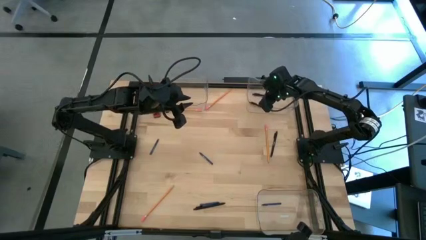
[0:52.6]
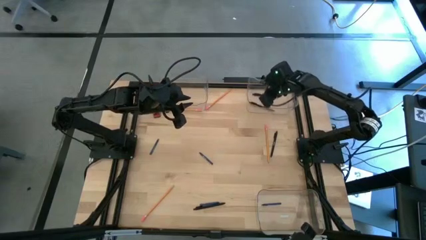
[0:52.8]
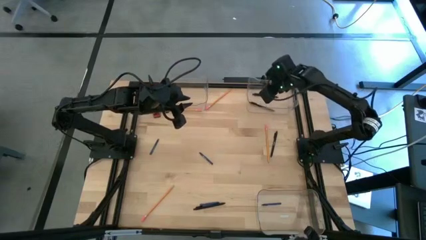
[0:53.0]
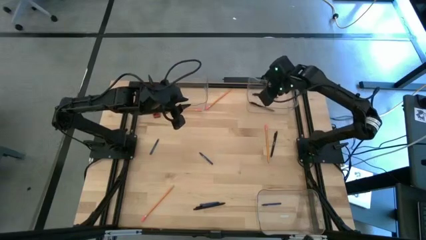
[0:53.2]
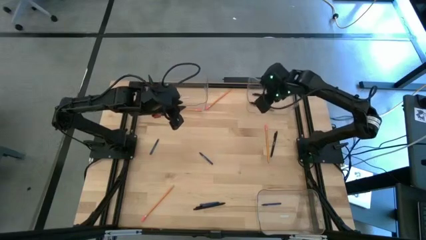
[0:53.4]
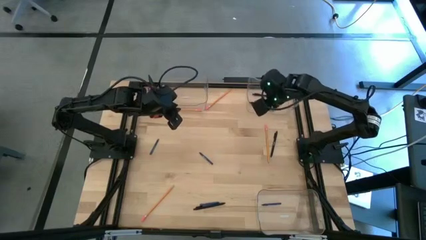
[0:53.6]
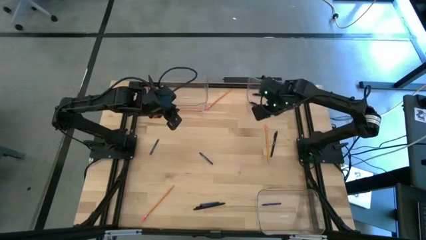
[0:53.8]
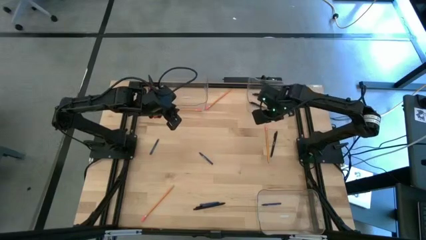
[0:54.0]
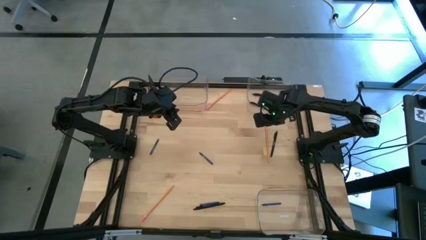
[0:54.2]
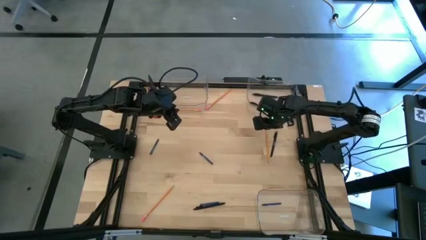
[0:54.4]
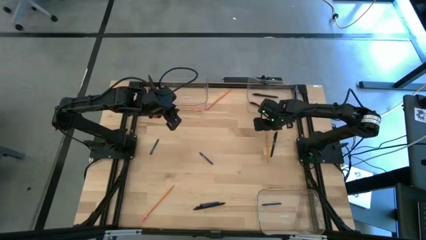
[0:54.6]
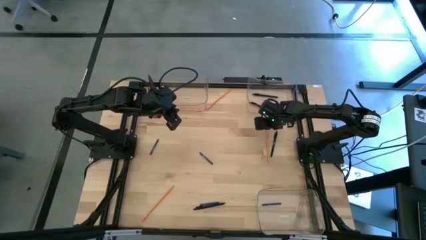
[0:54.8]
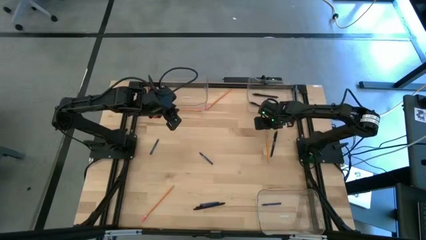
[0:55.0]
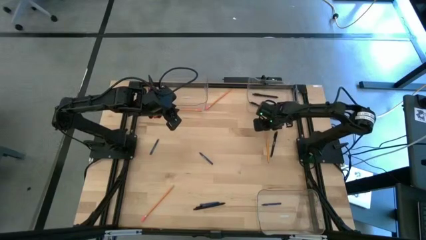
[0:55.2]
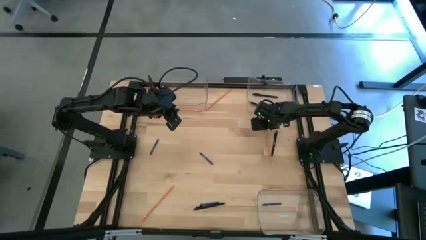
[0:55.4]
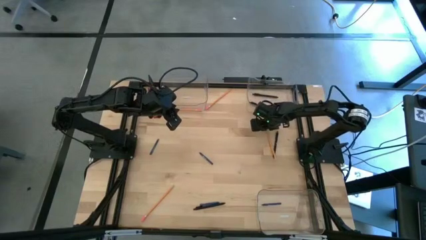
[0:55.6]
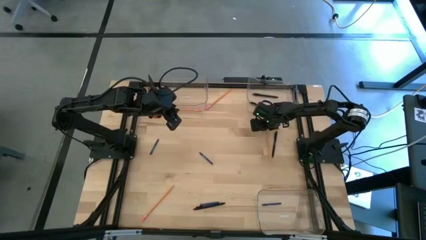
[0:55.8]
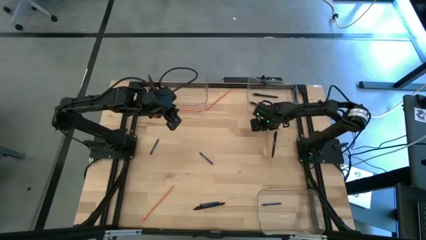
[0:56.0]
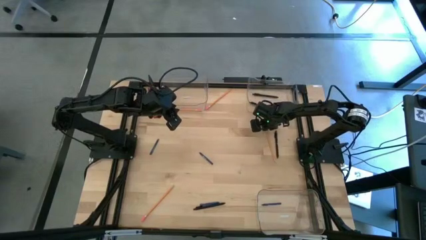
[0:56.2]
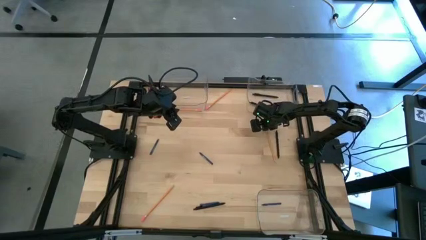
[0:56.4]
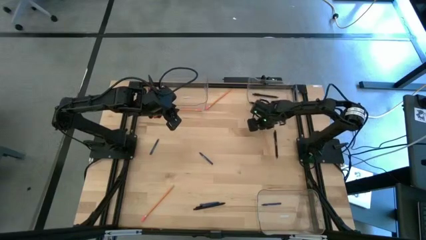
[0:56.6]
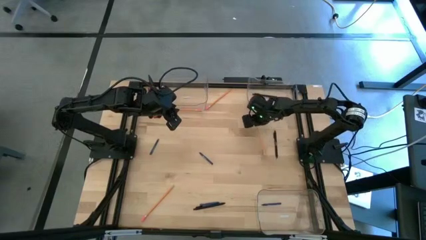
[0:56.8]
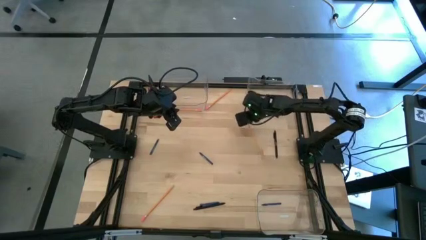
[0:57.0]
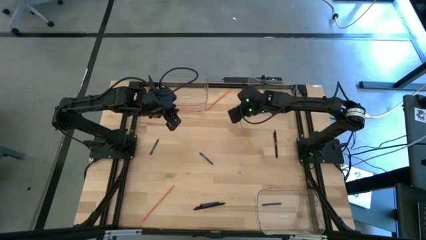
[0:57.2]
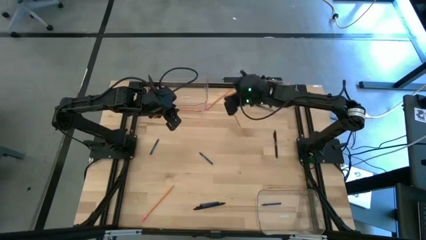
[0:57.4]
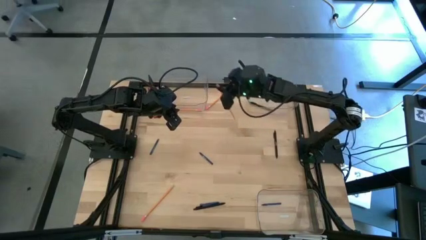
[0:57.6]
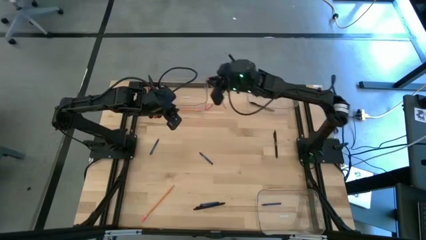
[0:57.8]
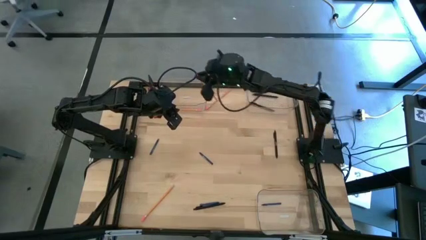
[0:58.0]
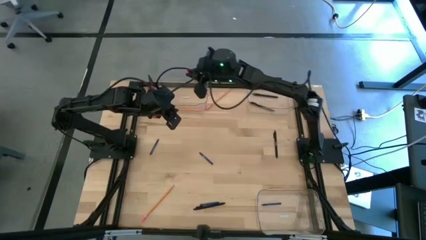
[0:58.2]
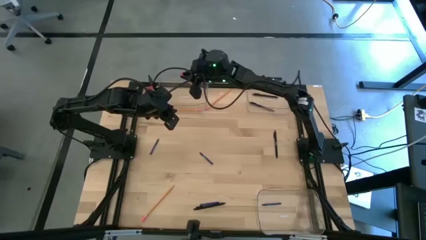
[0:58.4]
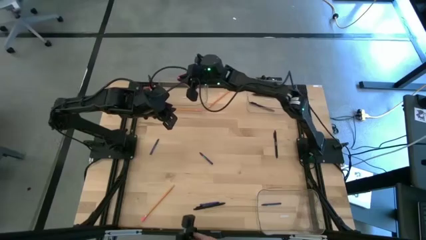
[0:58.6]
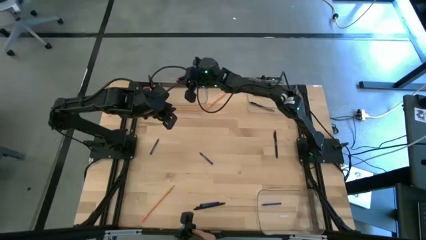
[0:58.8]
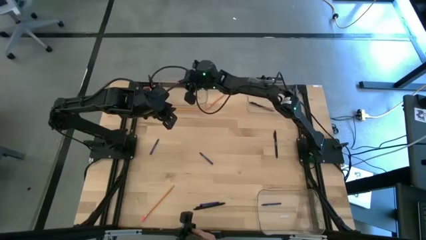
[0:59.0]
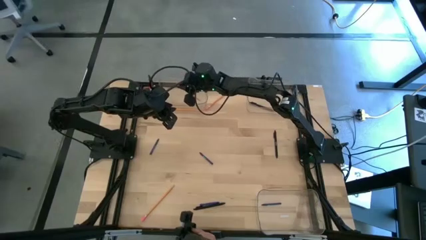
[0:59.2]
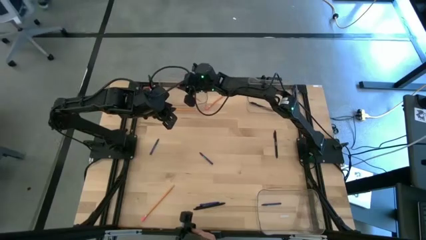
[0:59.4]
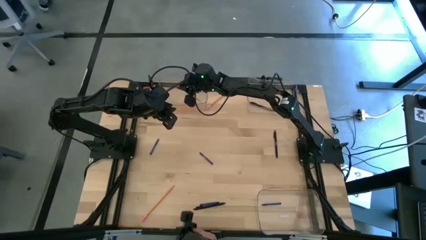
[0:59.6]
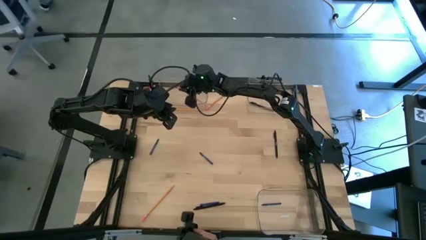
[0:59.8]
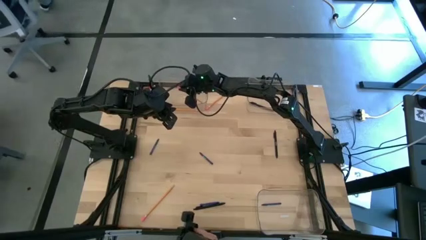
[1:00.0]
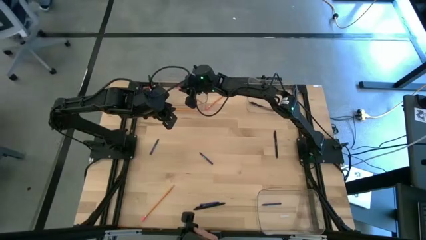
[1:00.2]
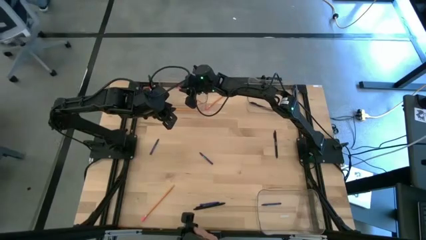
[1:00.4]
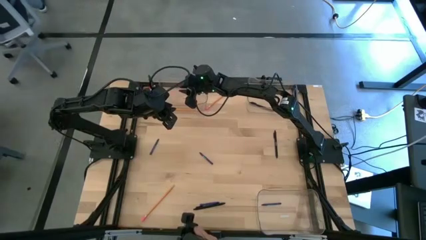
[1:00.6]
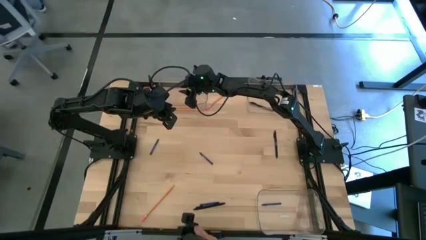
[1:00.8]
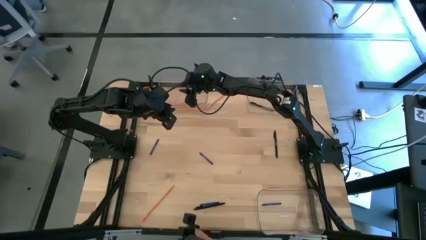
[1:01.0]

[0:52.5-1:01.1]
Task: Sort crayons/erasers/pens/pencils in bins
Put the yellow pencil into the top left transparent bin

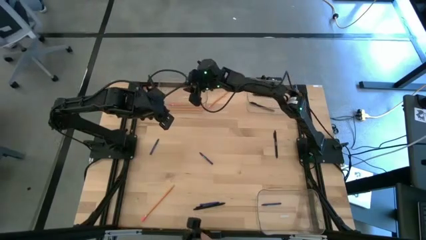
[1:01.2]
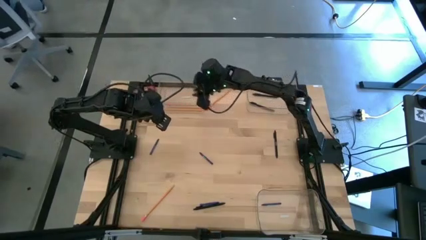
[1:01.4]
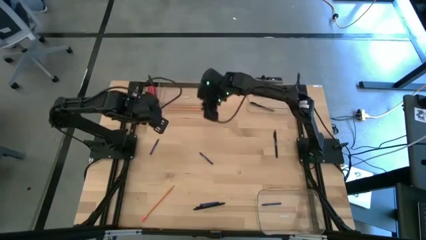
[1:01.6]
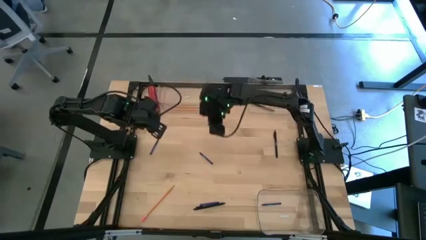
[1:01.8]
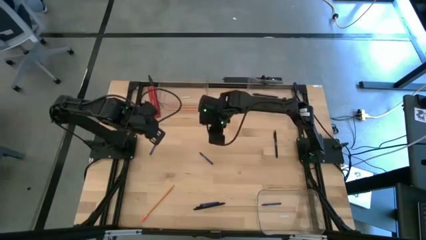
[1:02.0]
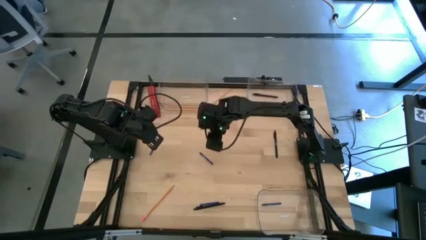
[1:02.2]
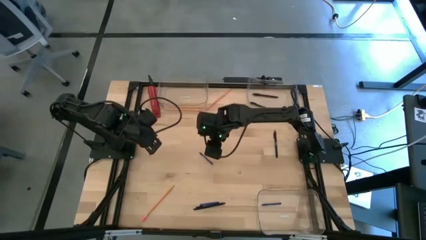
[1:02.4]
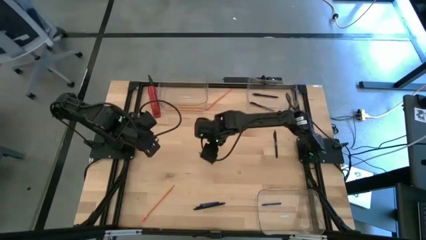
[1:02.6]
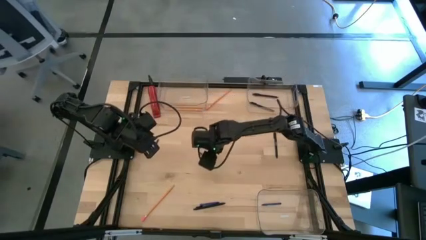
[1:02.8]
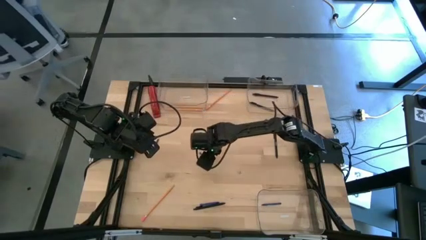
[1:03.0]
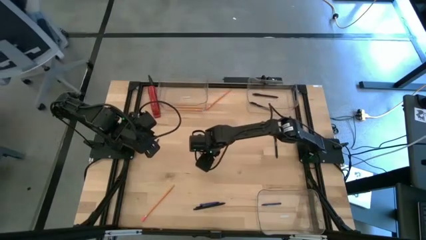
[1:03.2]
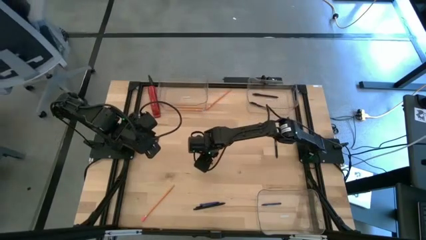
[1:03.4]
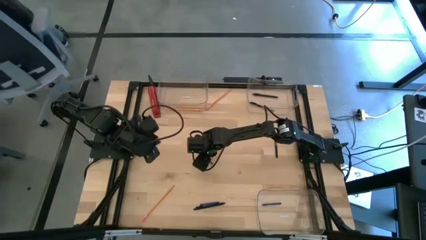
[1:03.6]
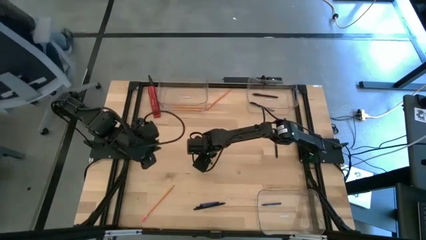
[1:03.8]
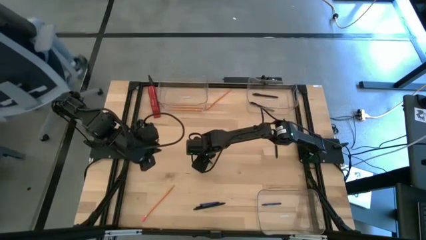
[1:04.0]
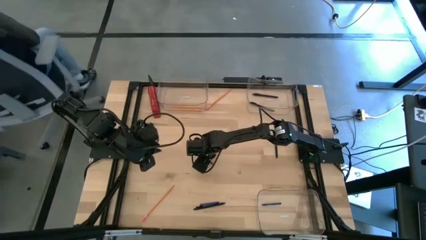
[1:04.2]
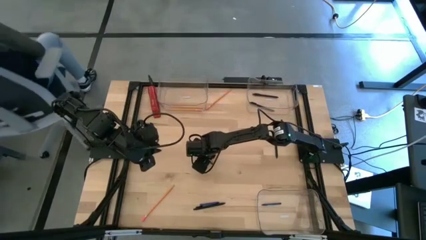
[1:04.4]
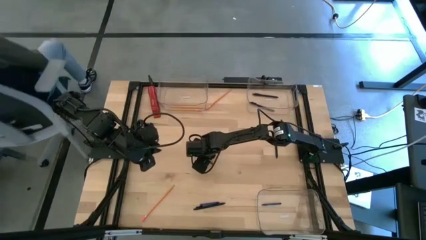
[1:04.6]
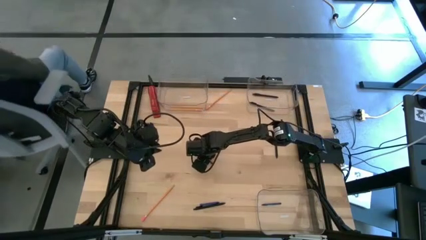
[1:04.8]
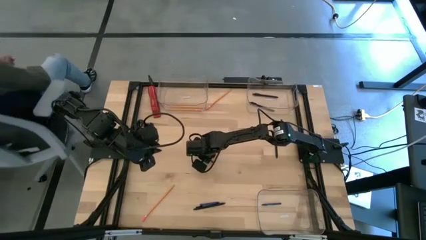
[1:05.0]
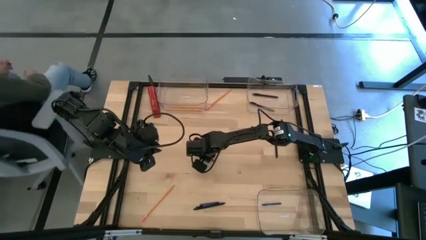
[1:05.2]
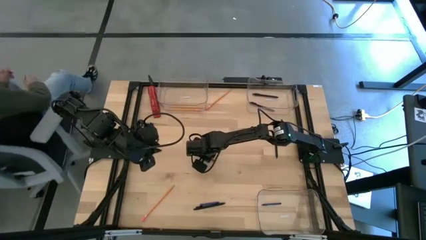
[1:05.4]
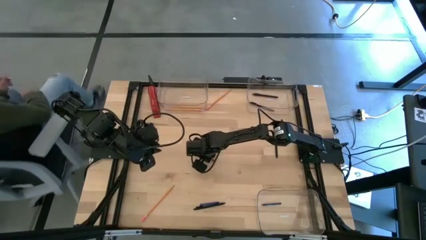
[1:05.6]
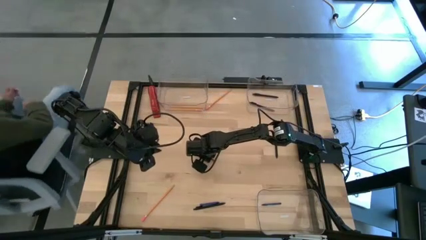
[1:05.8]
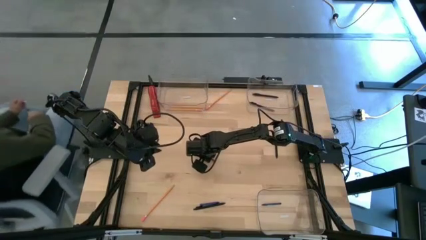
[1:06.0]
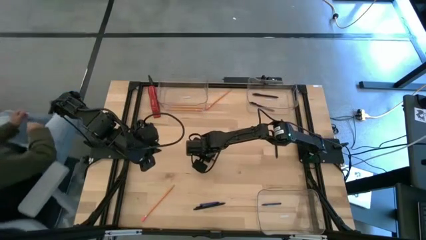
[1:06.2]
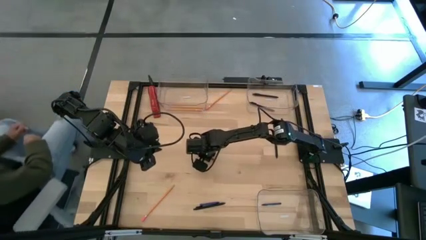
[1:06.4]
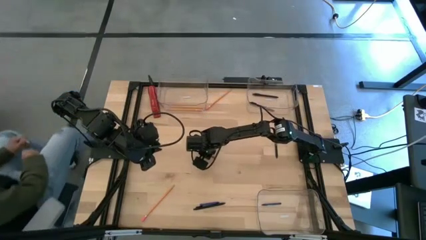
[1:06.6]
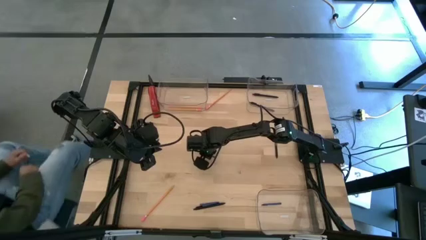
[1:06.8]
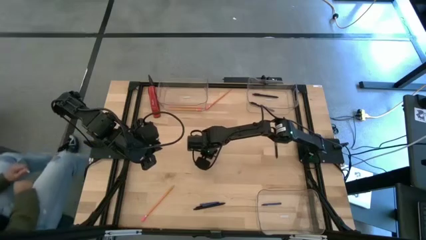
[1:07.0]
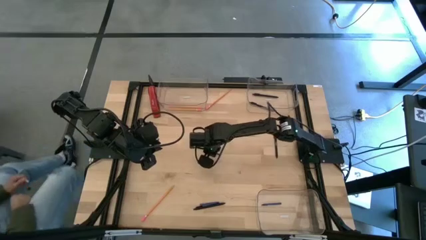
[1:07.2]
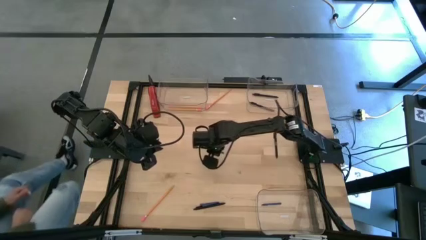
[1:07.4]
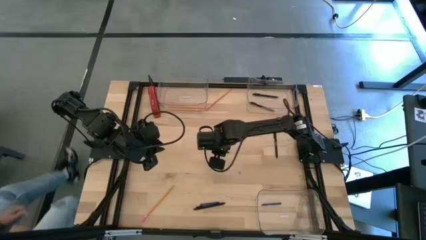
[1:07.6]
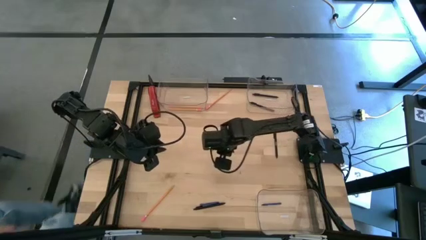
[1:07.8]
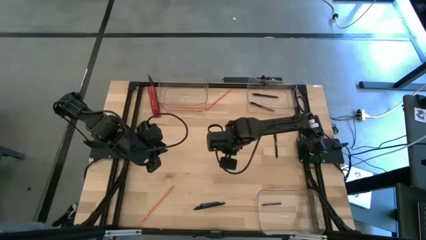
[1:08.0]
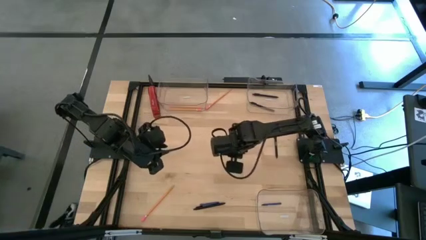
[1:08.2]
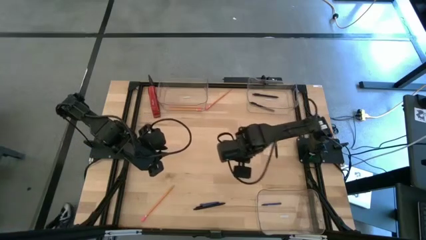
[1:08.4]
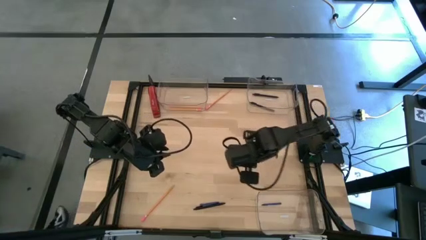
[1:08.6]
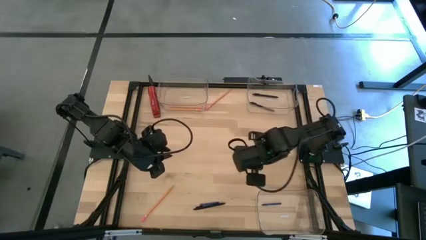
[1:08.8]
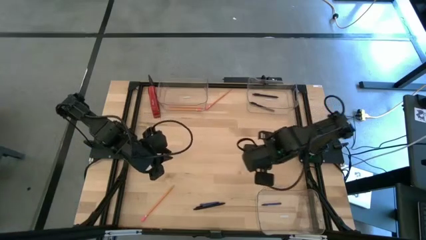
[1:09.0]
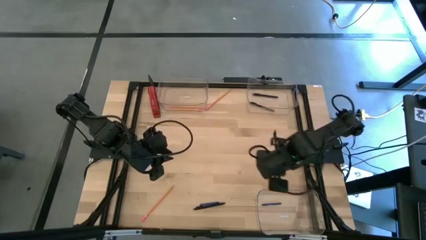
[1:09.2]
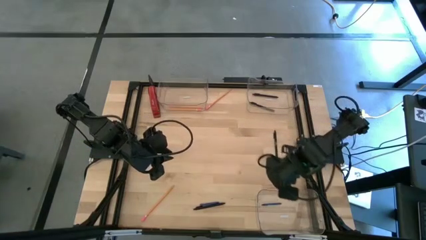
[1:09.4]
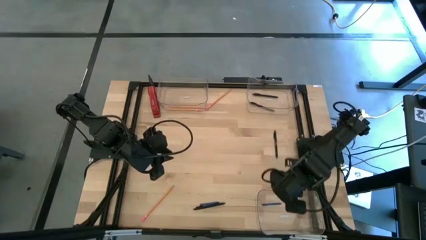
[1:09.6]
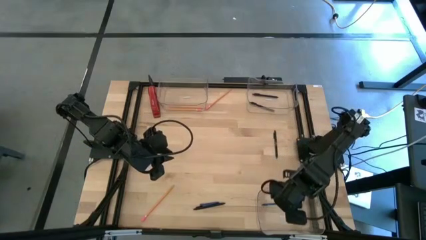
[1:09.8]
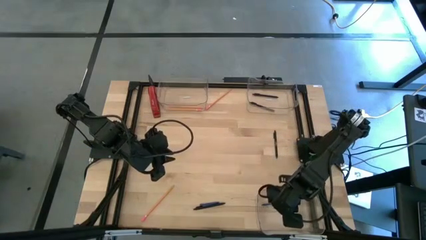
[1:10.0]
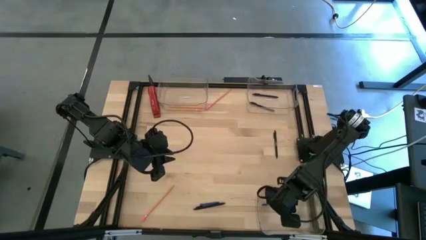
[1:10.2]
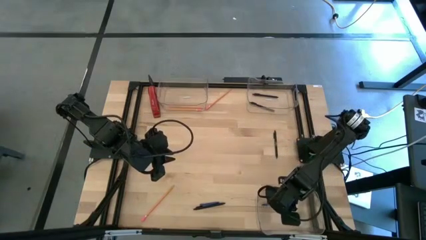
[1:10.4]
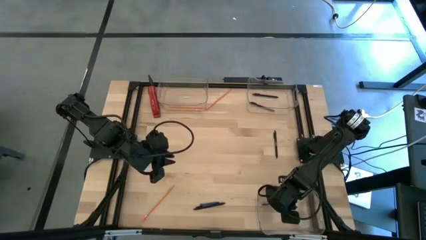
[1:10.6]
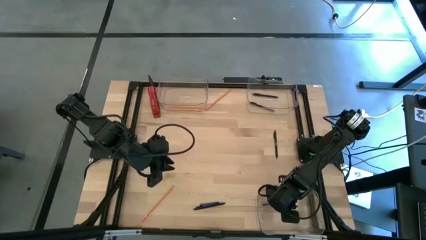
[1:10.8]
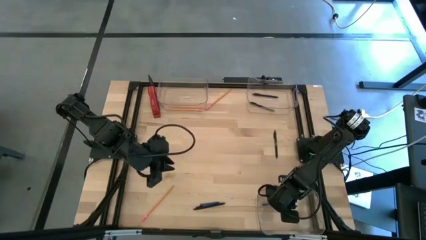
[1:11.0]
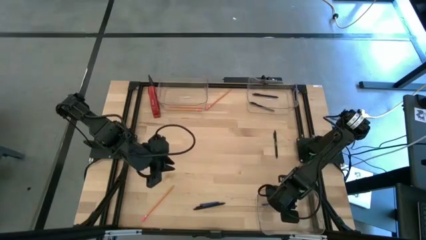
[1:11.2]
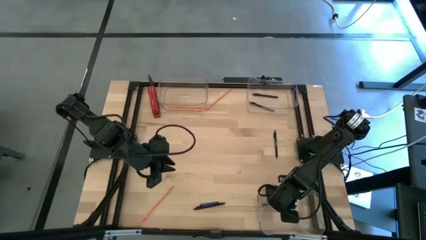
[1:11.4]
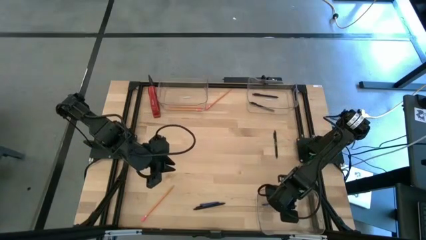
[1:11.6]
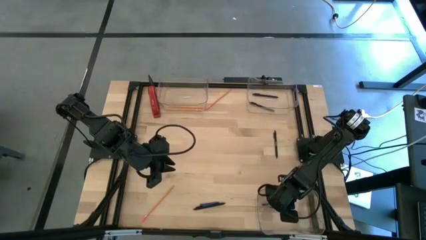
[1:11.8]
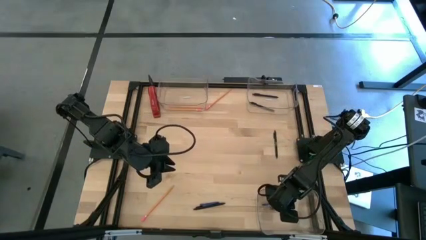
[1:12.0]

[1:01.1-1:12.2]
Put the blue crayon into the bottom transparent bin
